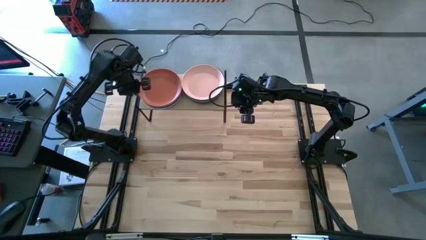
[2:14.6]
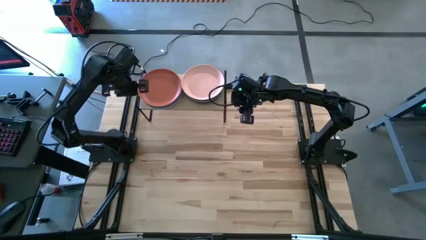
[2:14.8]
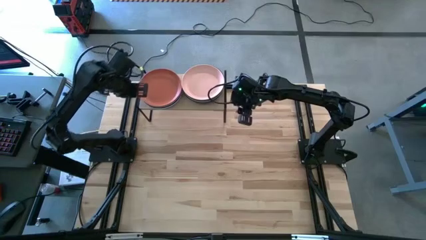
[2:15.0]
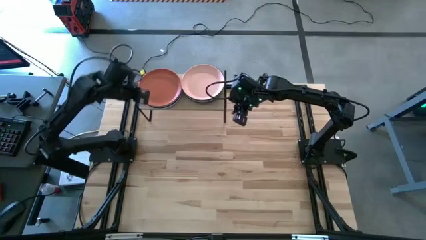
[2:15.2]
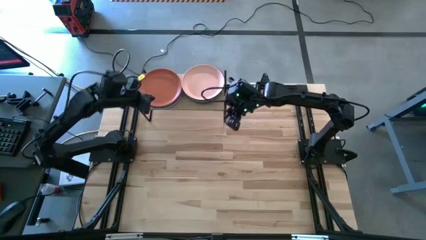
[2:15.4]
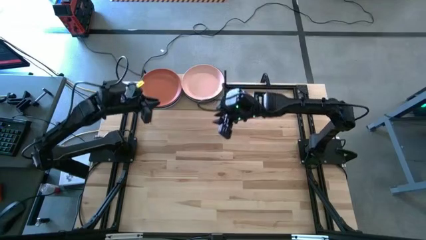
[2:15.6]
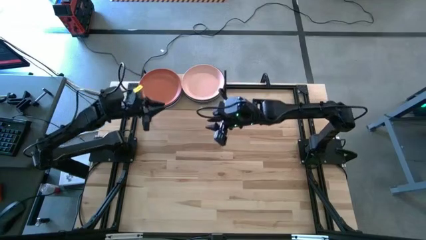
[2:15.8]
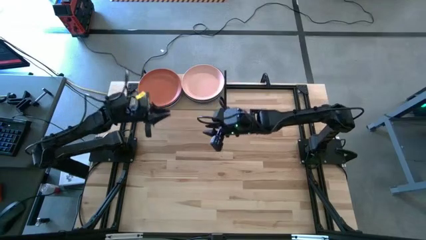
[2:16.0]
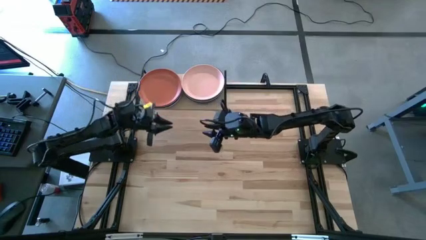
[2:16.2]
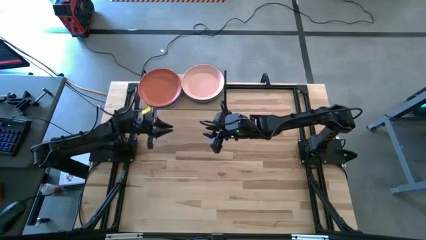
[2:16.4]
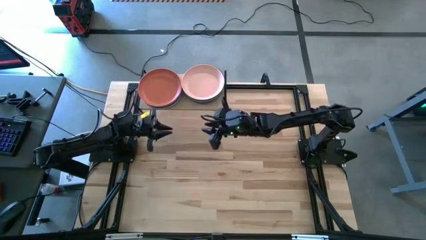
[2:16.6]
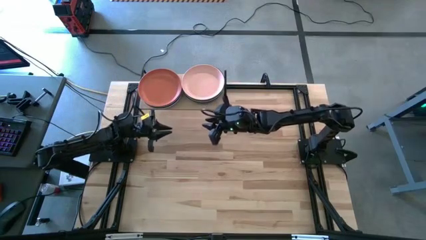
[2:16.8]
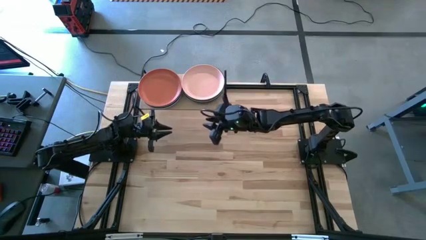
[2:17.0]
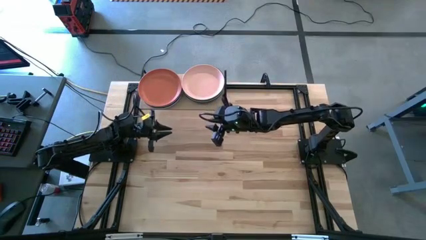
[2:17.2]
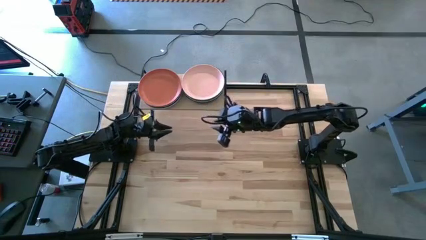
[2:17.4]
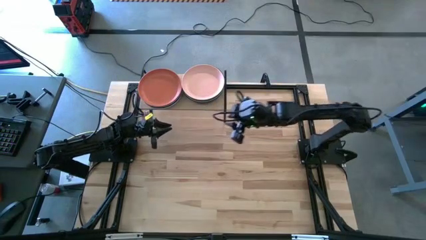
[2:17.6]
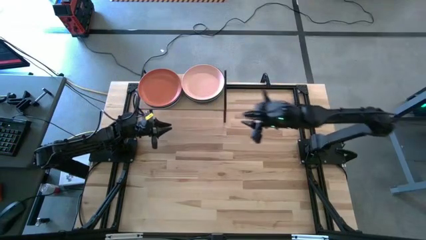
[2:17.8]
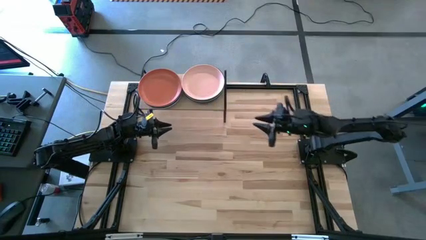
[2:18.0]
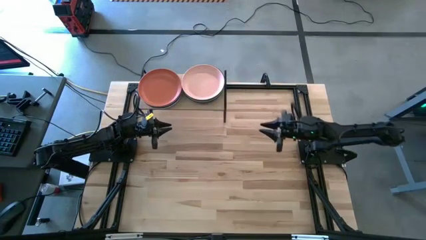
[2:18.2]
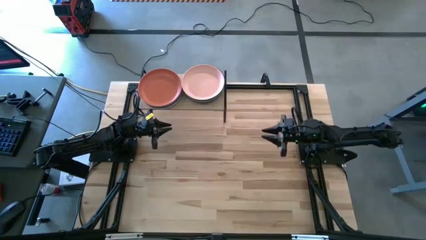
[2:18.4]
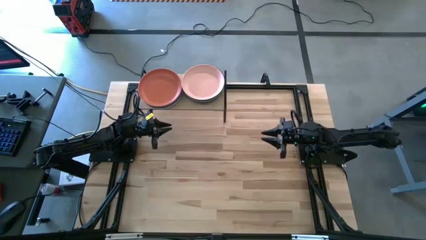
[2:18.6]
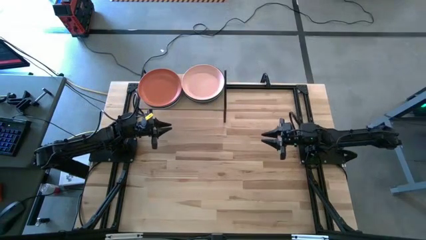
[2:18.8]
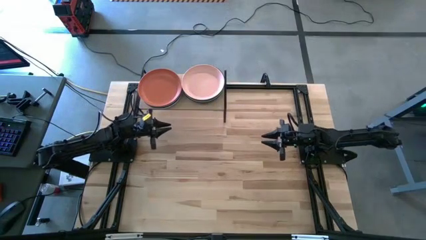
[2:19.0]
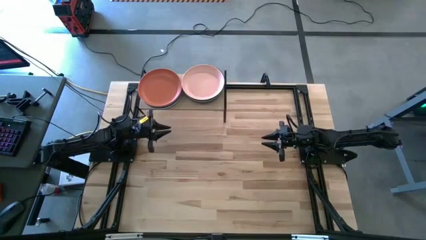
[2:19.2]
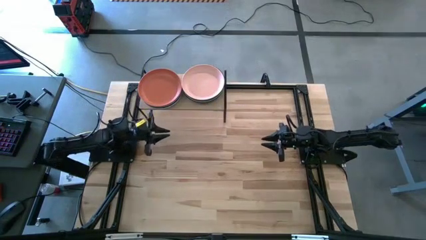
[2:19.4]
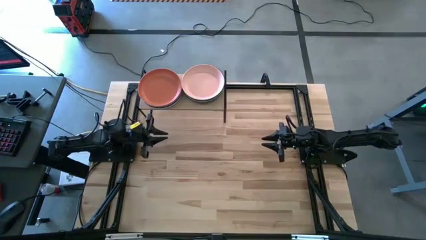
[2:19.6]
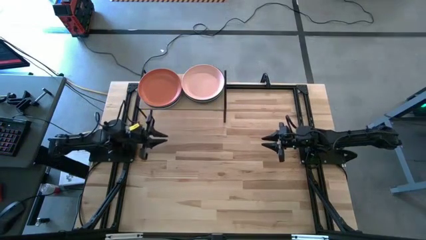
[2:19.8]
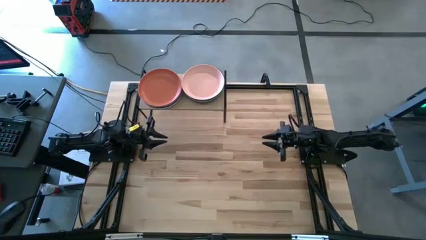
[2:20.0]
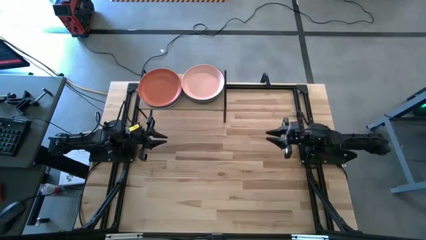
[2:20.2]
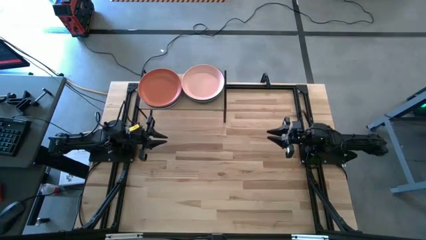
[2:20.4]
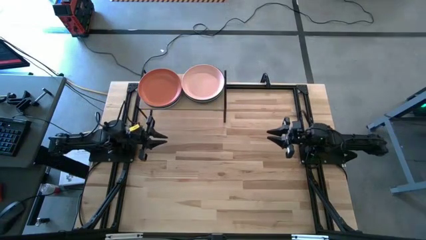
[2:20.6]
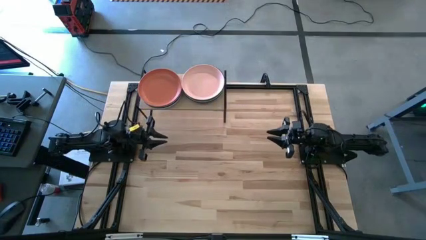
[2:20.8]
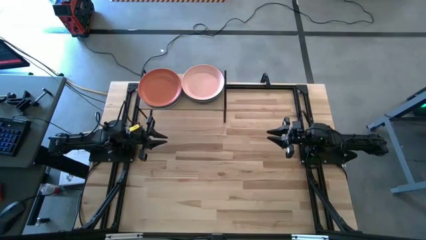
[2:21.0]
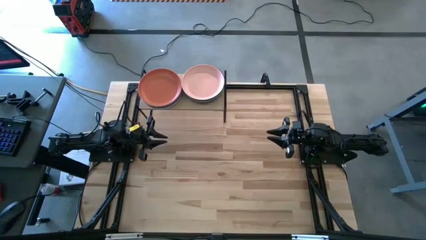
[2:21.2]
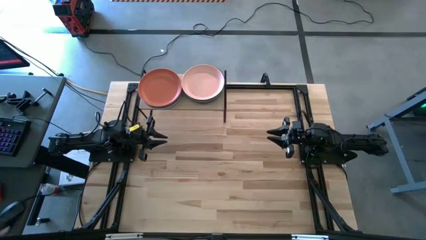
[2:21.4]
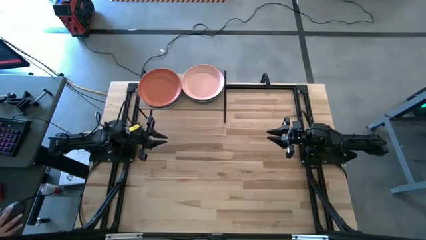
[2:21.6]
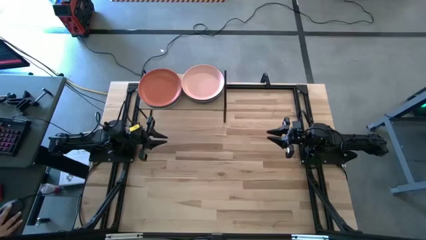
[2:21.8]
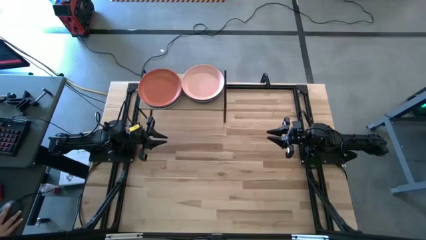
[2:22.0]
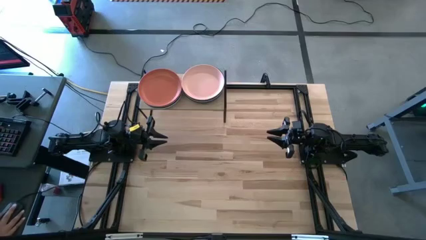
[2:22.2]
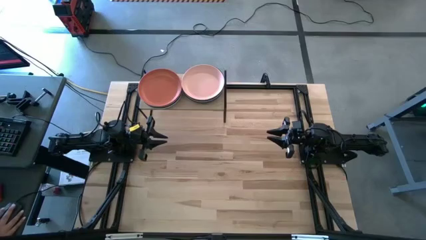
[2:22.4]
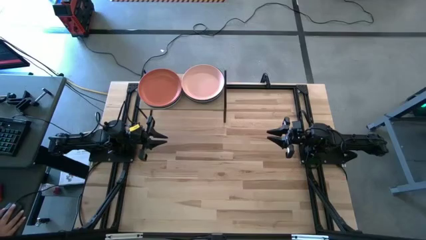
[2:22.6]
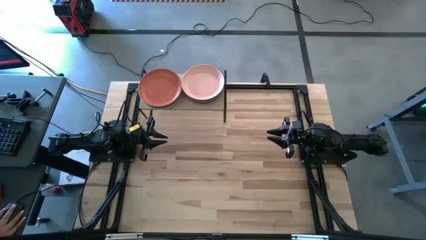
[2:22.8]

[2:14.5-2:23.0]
Task: Place and stack plates onto a shelf
Return to Home Position
